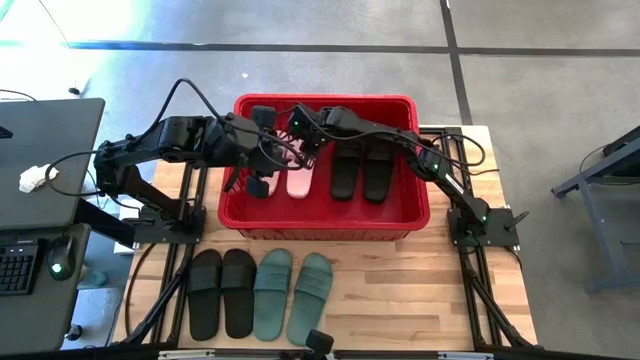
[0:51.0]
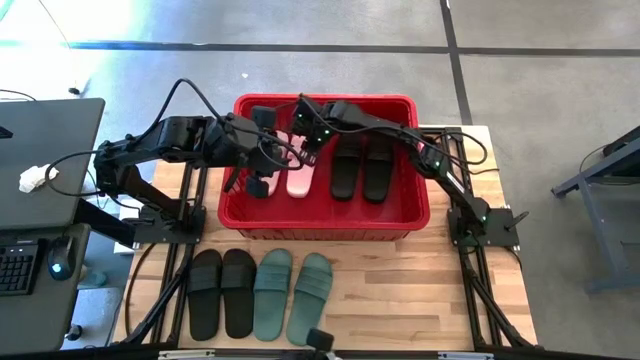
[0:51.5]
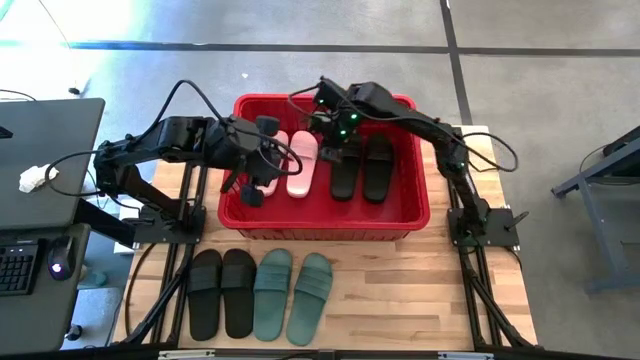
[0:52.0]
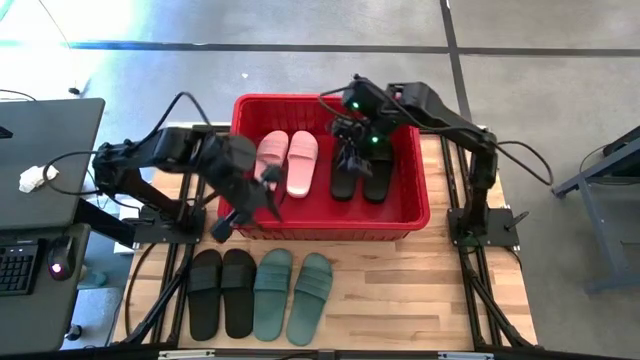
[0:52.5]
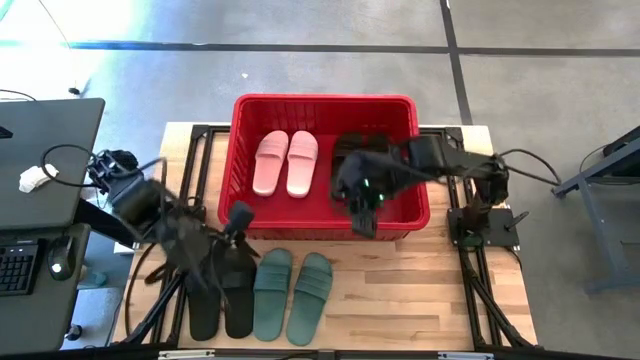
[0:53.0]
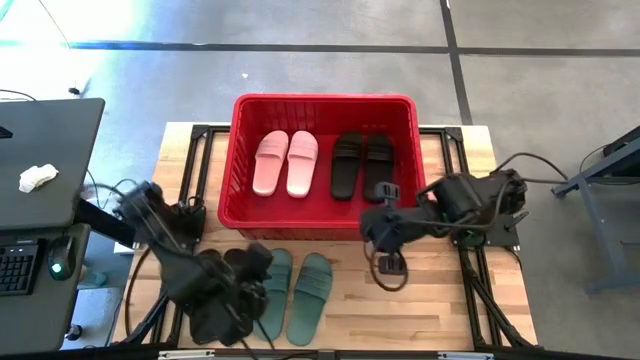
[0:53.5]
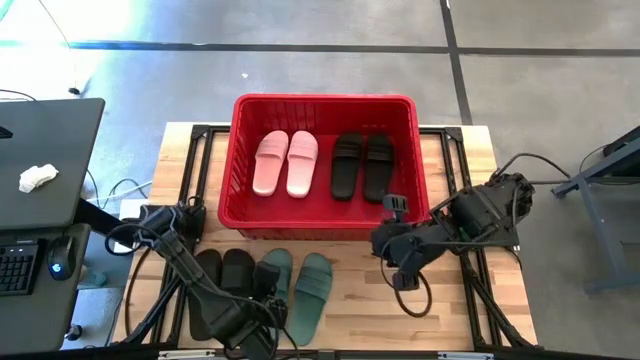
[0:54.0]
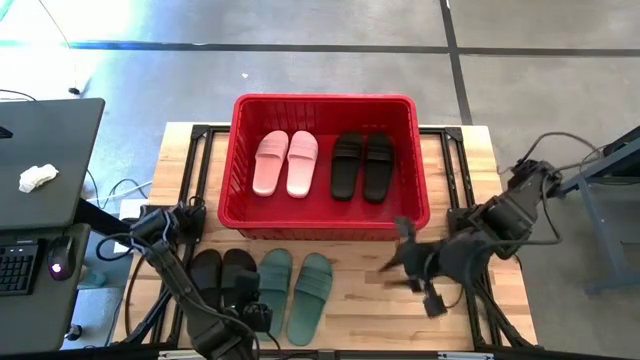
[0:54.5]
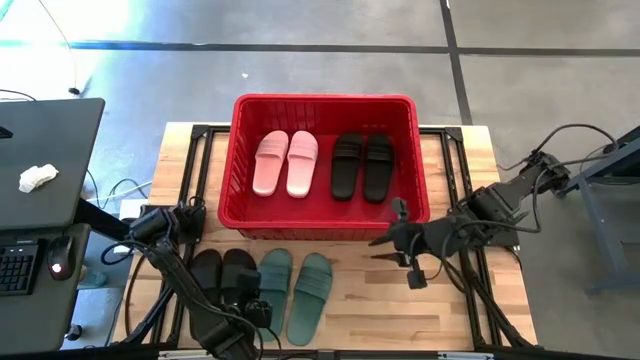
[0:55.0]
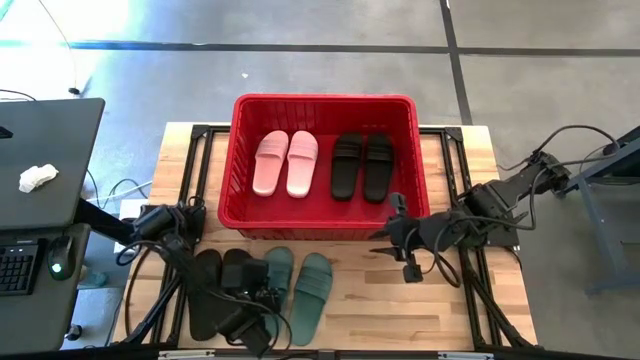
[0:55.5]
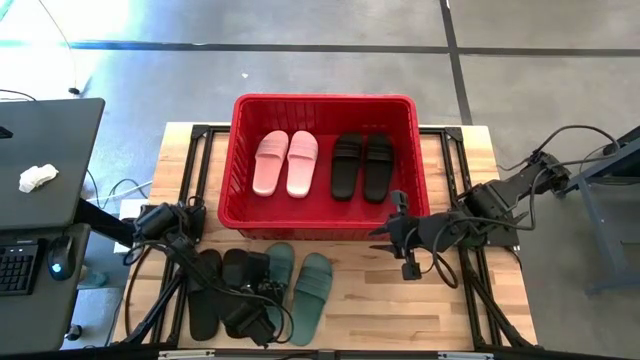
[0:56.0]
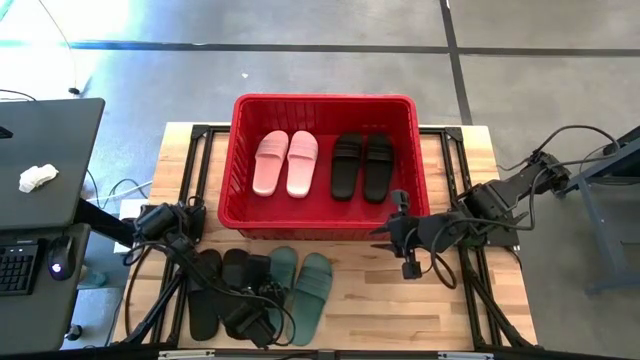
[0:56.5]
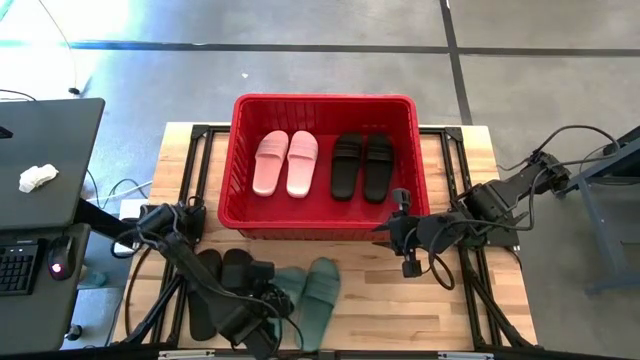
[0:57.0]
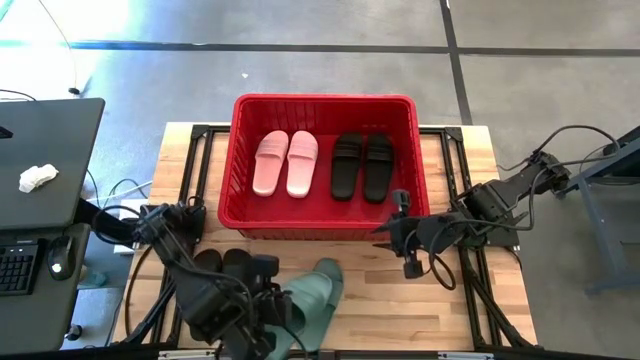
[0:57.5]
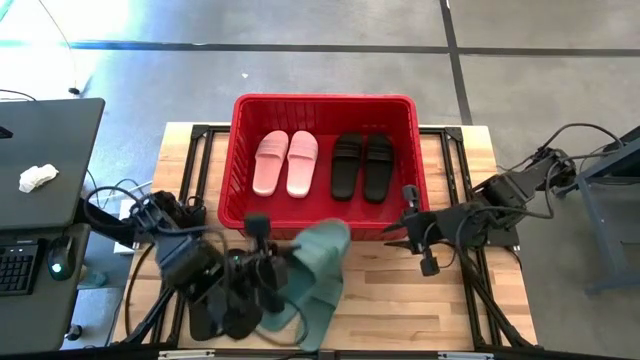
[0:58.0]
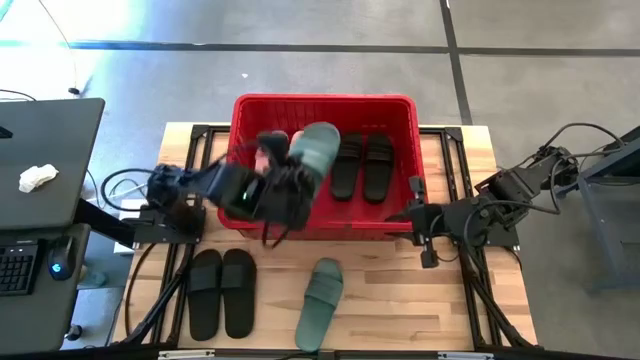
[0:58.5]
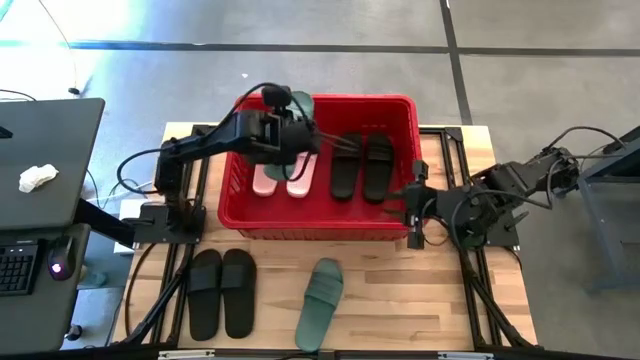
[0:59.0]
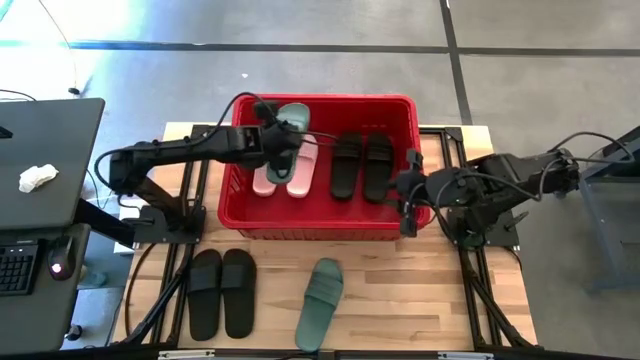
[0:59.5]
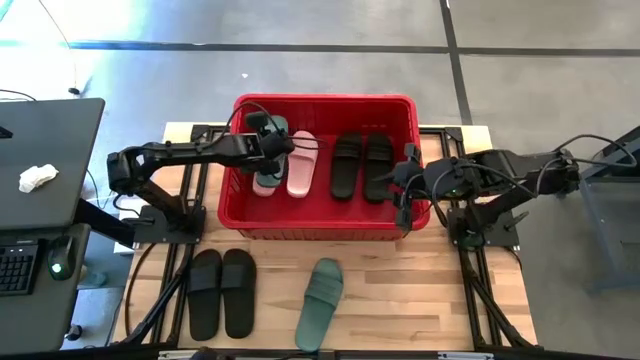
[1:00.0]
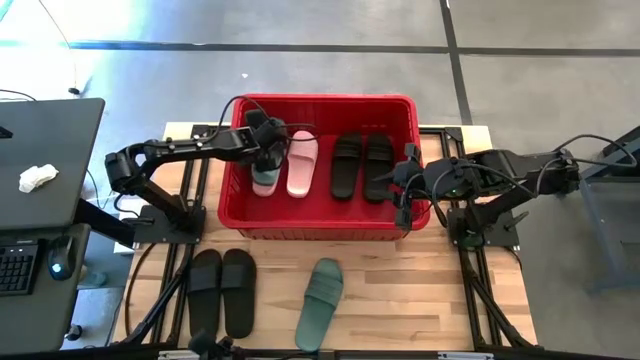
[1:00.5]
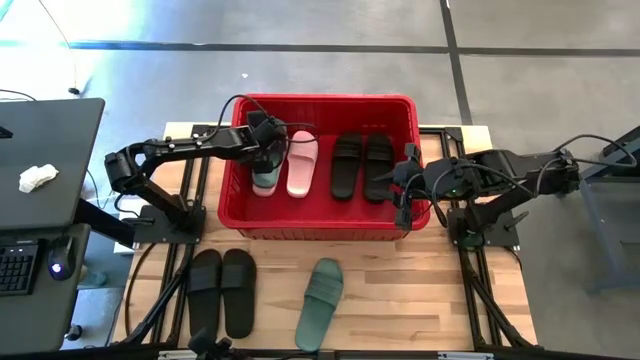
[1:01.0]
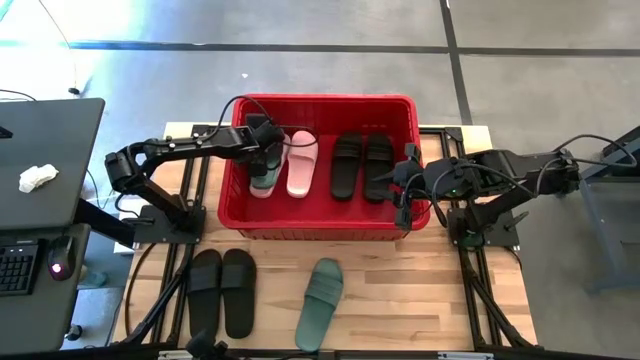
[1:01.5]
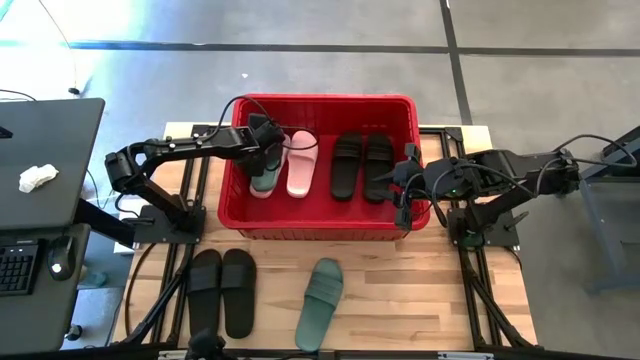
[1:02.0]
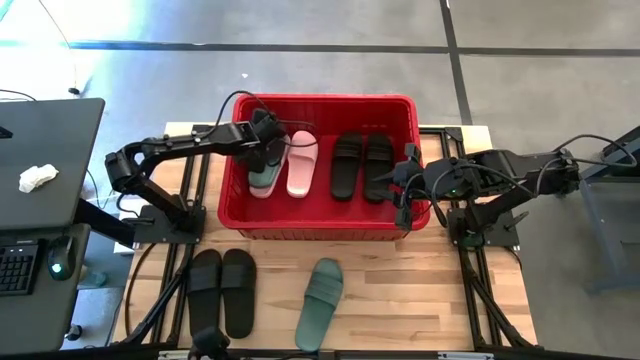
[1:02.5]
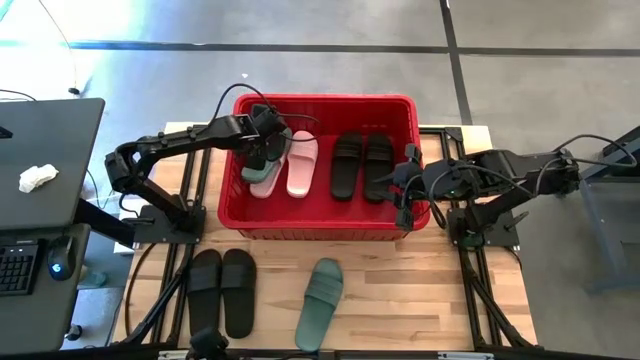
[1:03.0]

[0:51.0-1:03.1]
Task: Pick and place slides into bin
Put the green slide into the red bin

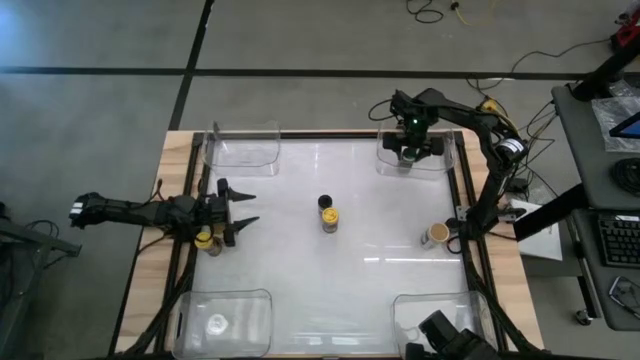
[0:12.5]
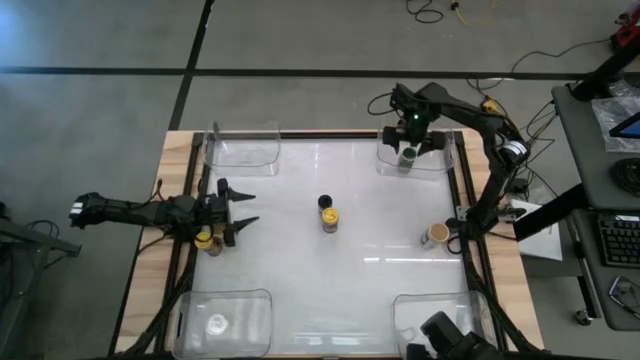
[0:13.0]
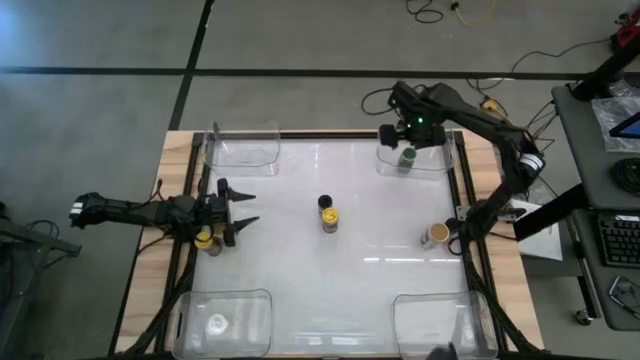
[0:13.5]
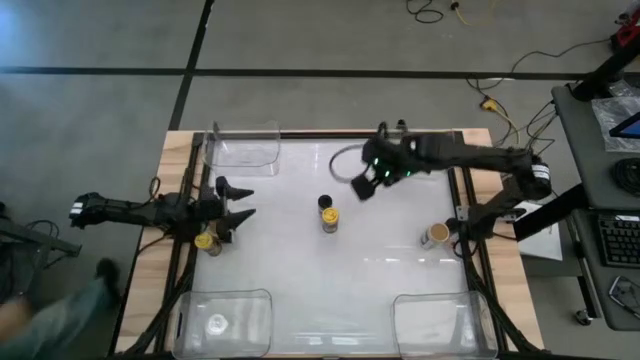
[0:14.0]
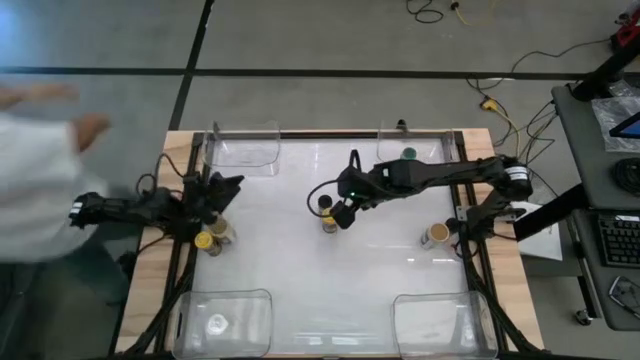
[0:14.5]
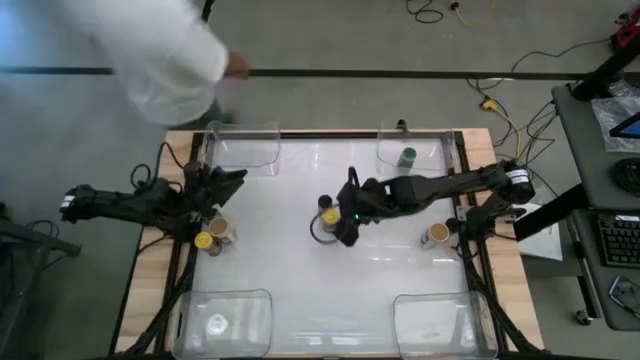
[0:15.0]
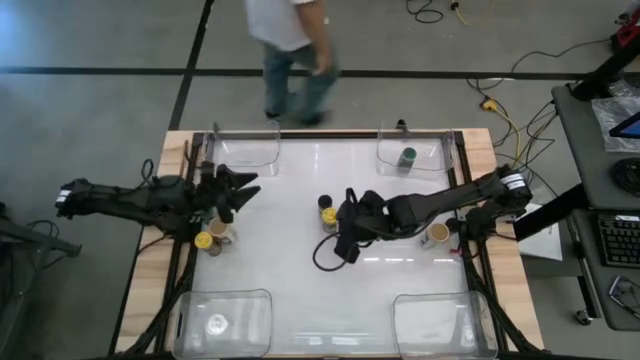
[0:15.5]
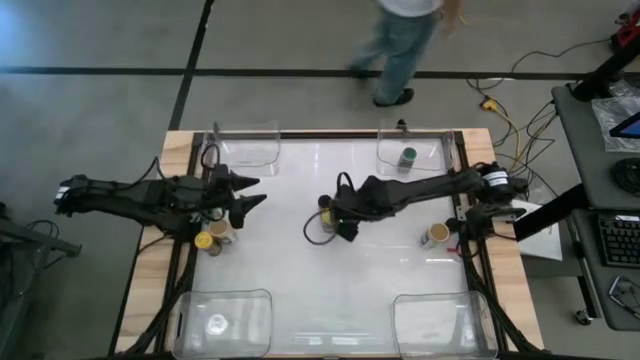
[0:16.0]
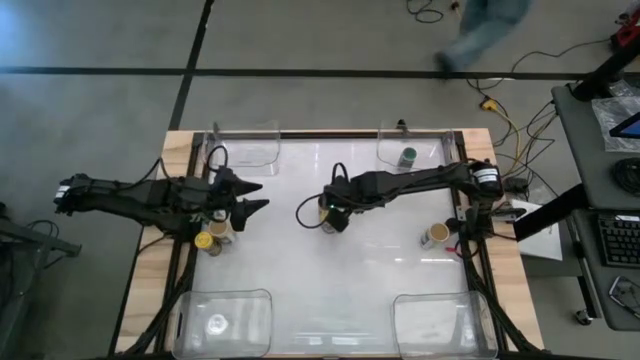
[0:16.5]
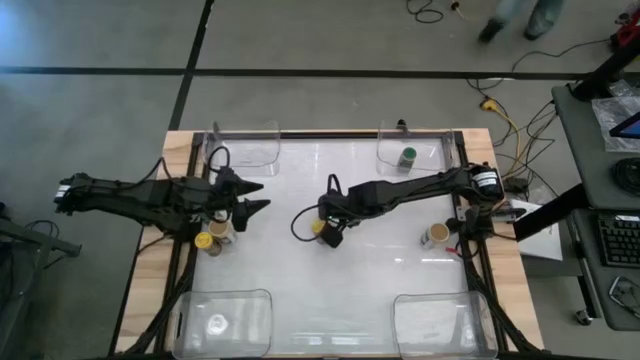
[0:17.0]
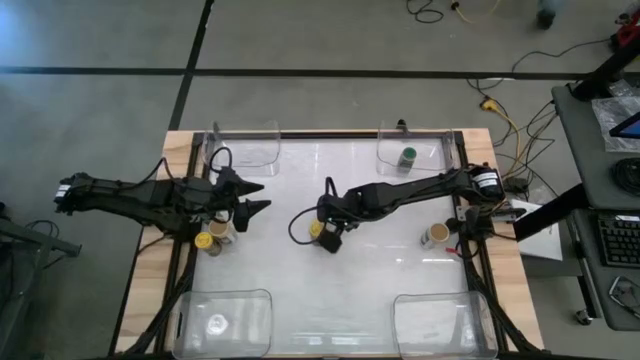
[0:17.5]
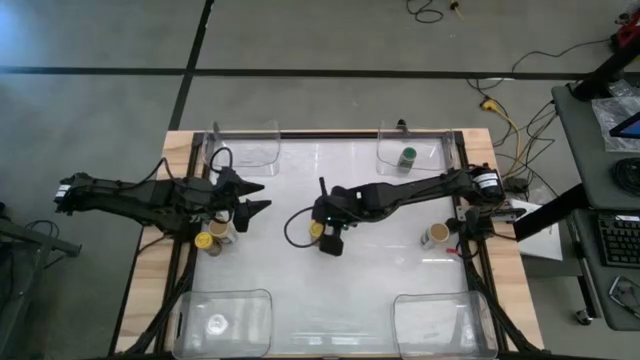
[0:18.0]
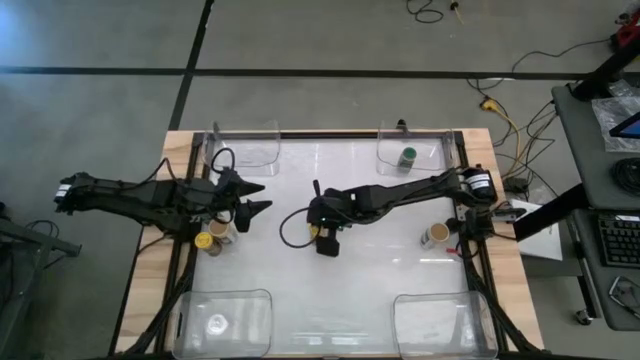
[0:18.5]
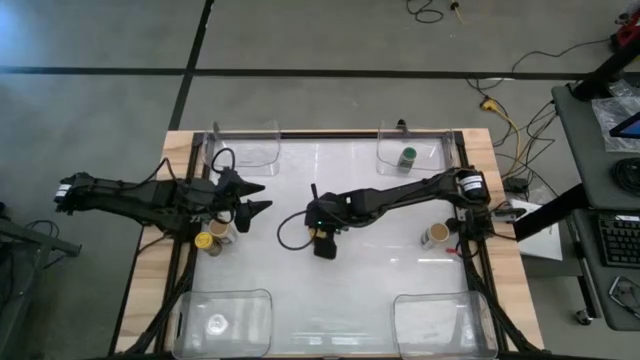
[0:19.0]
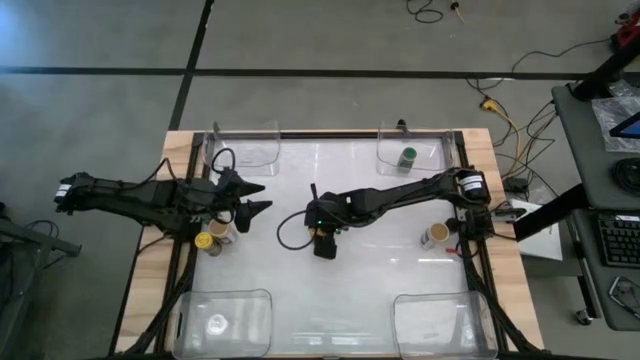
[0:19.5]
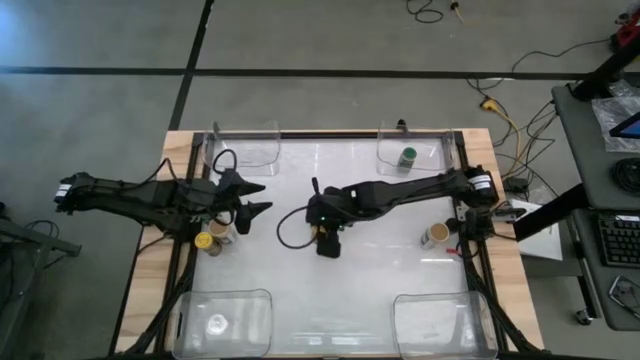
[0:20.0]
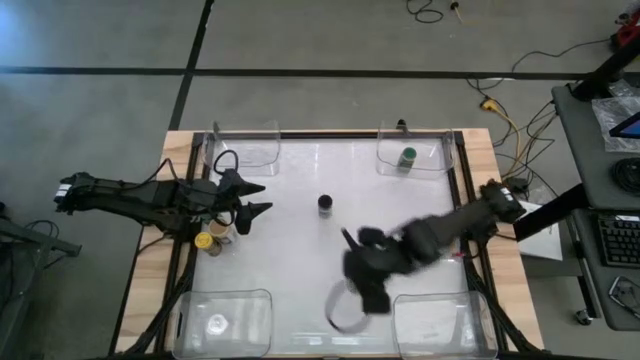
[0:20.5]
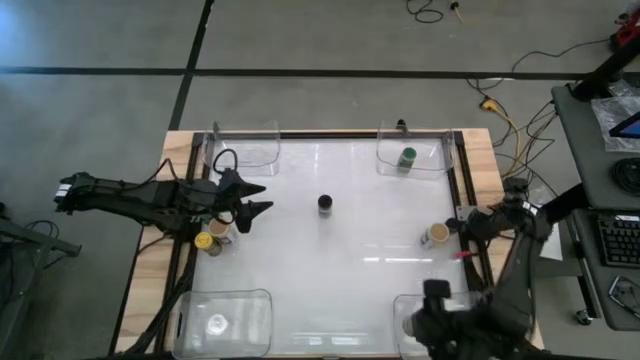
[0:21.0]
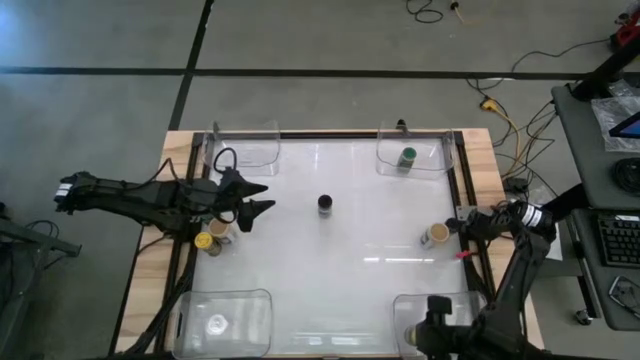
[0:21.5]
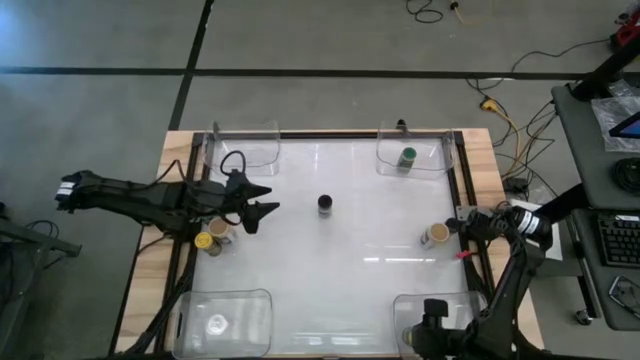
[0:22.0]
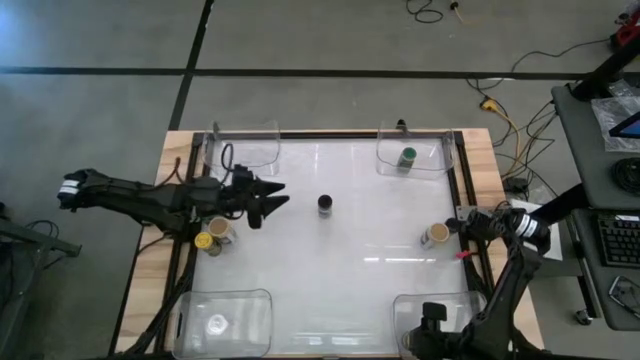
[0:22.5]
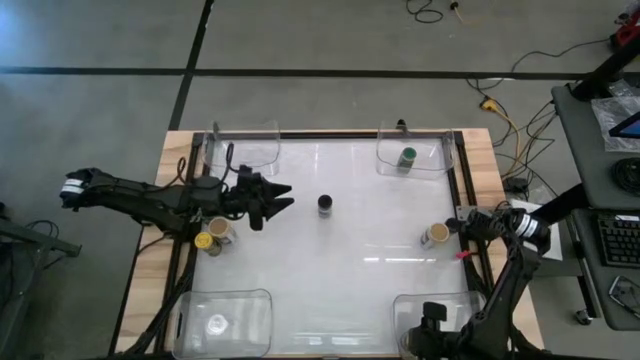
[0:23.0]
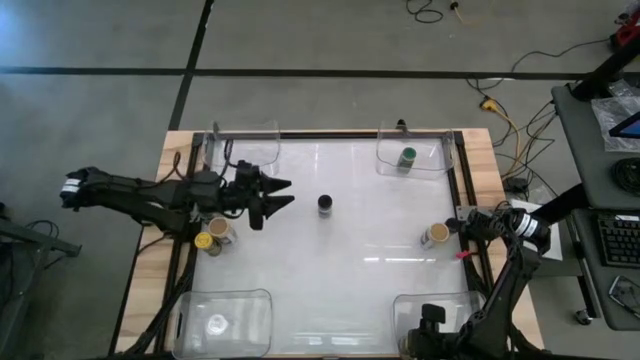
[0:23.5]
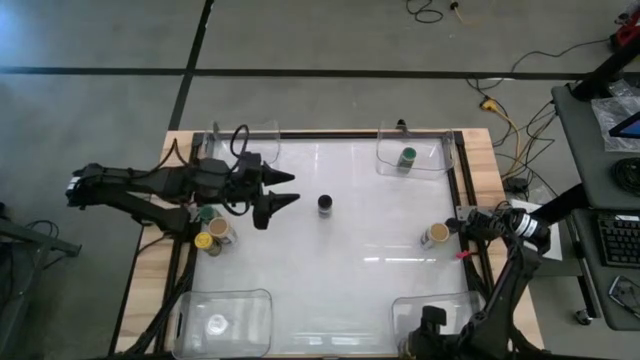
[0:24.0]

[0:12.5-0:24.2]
Task: Sort spices by type
Put the right yellow seasoning bottle into the bottom right transparent bin
